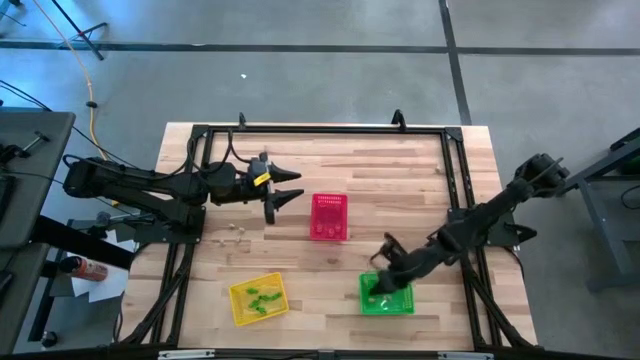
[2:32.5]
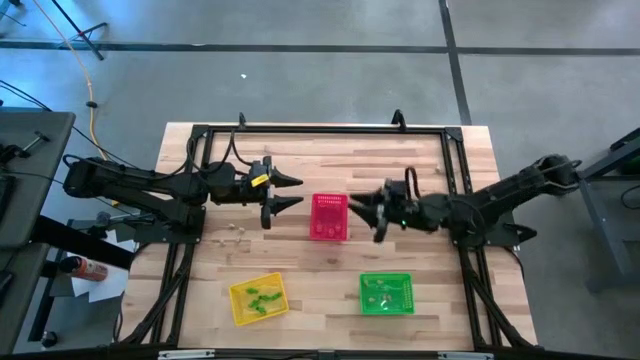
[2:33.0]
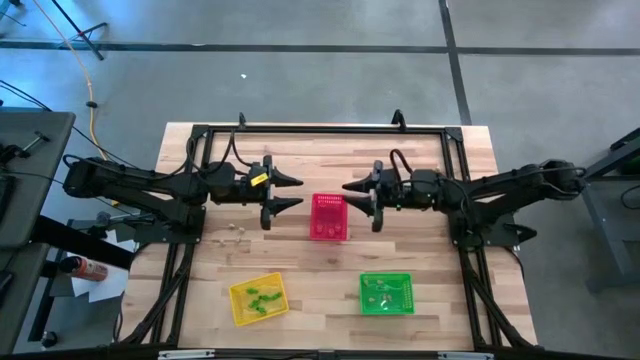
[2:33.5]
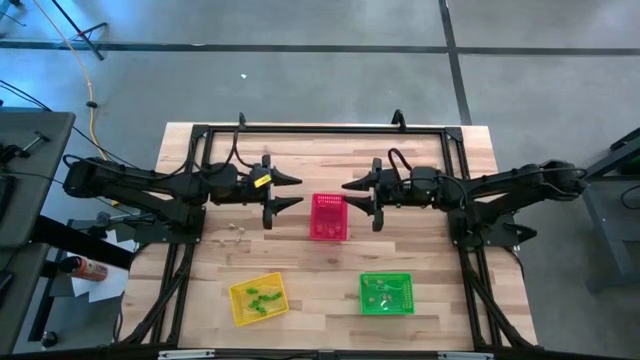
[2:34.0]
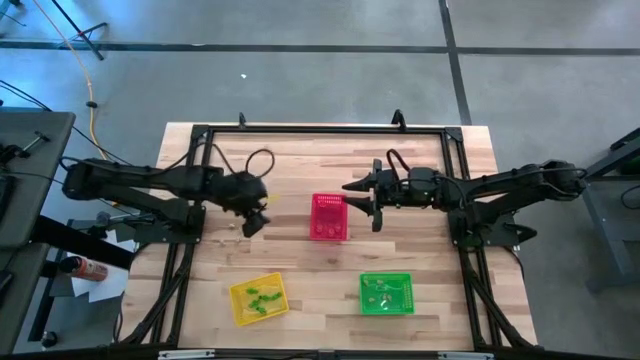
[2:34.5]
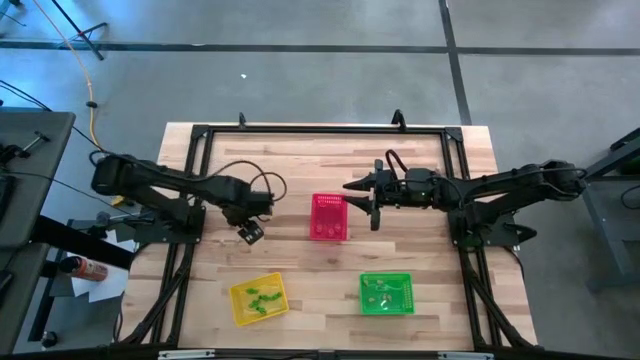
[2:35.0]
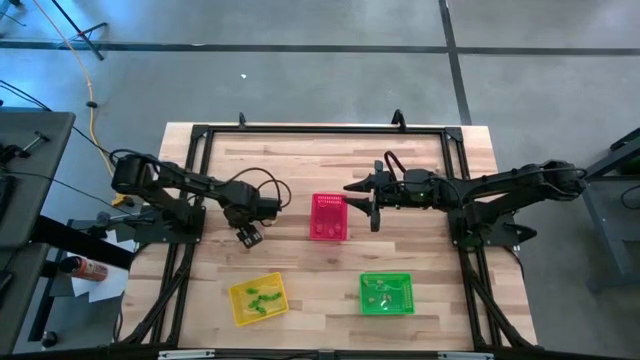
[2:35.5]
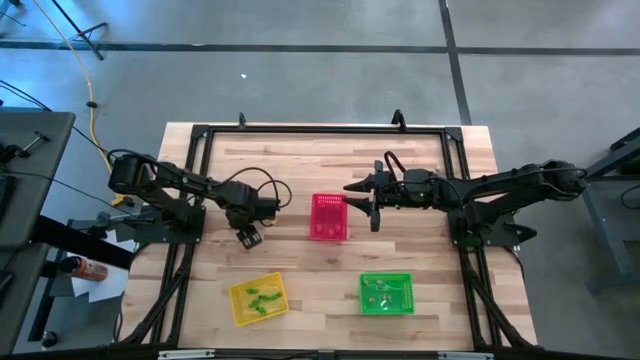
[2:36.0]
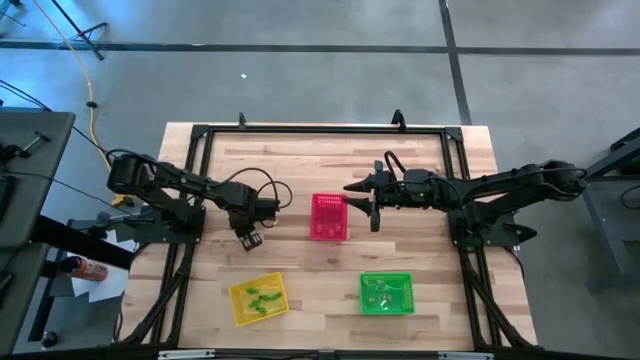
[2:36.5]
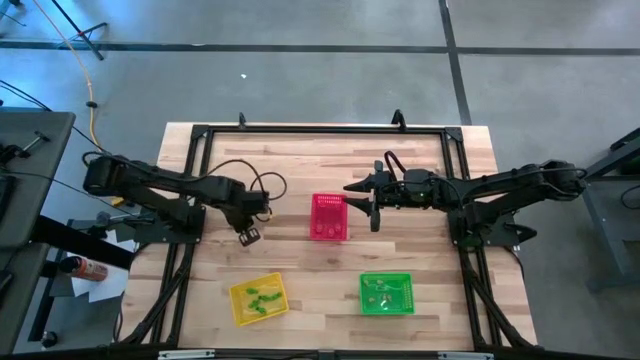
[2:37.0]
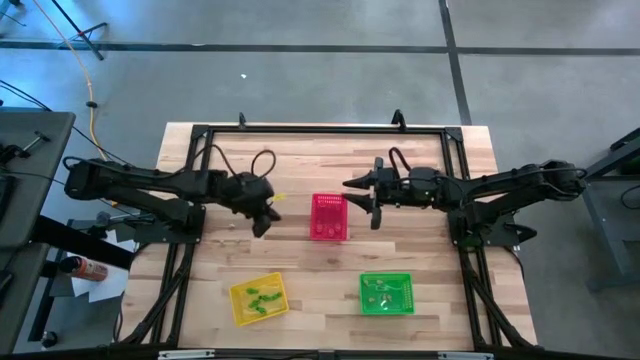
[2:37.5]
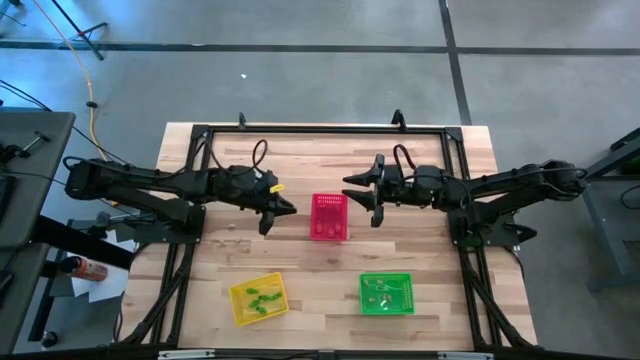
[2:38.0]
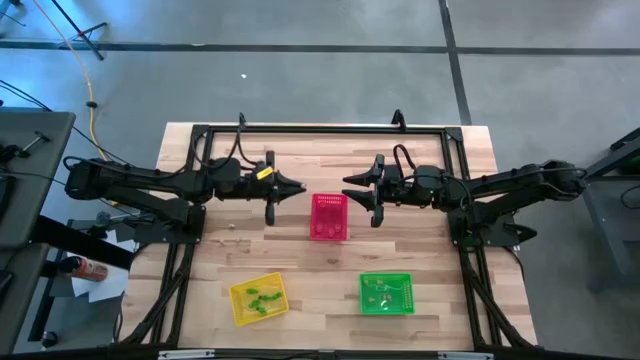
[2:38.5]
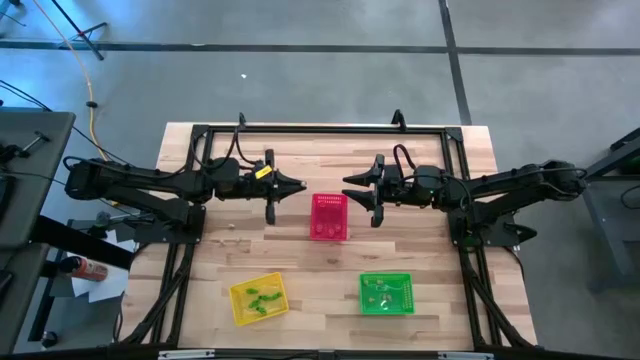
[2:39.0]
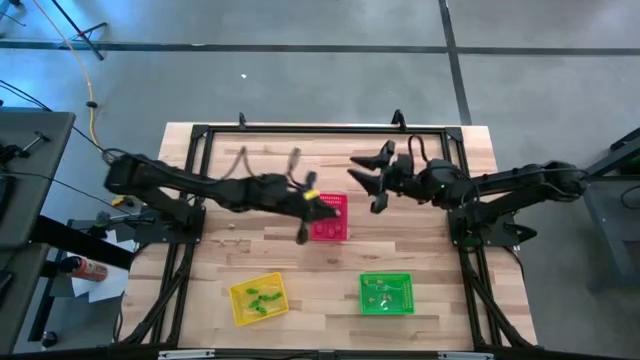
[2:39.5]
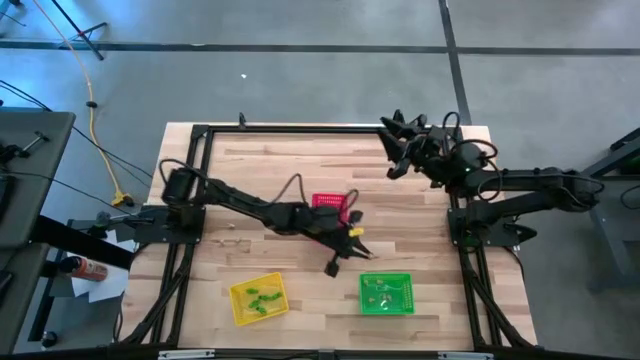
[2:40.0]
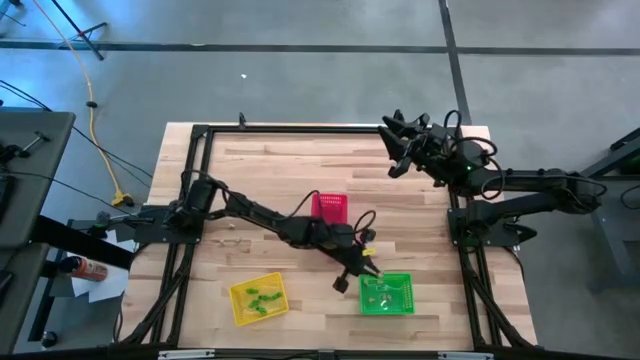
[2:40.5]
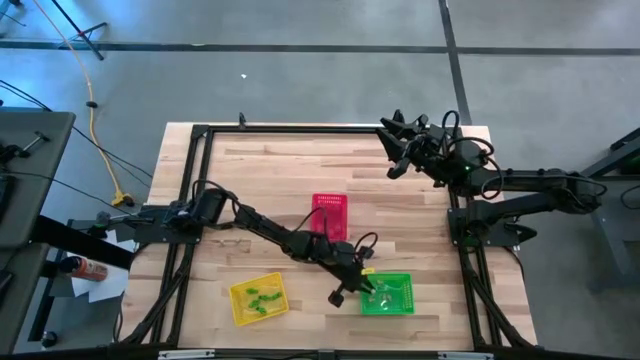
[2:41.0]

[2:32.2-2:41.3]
Task: Sort Halloween decoration
Put the white skull toy into the green bin

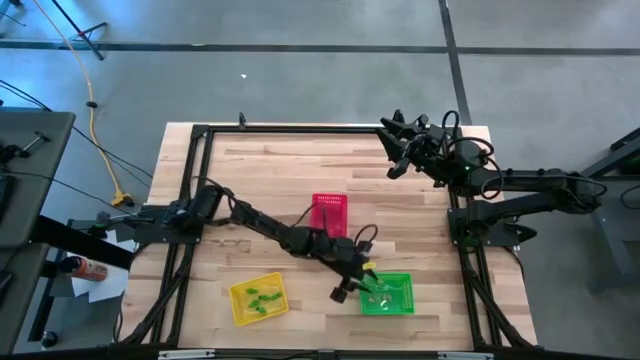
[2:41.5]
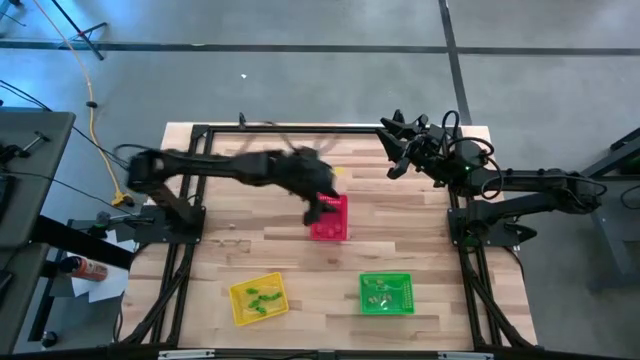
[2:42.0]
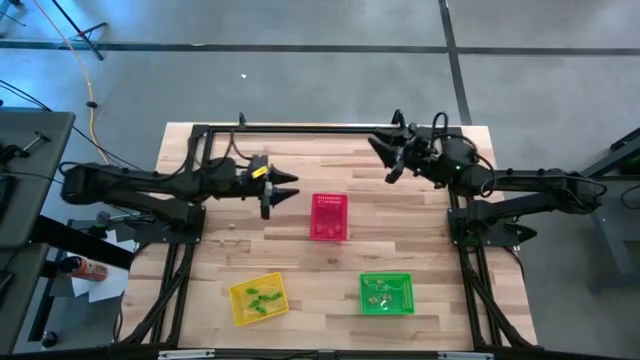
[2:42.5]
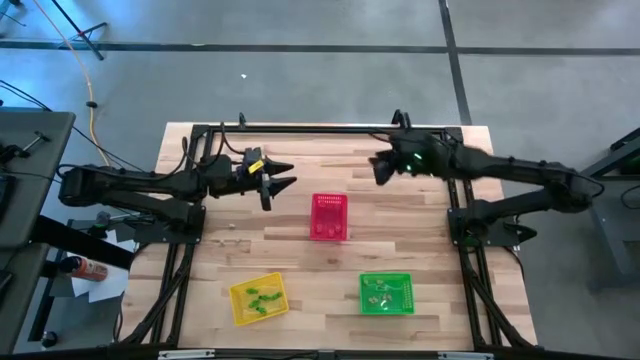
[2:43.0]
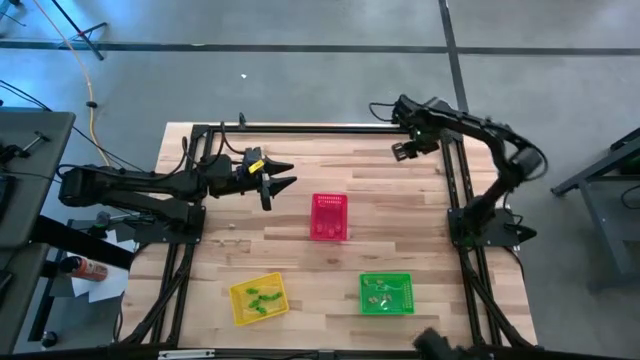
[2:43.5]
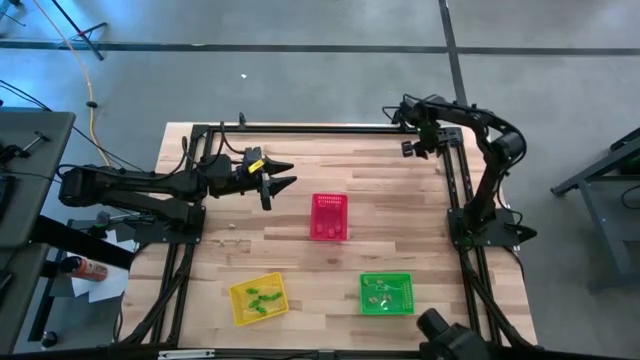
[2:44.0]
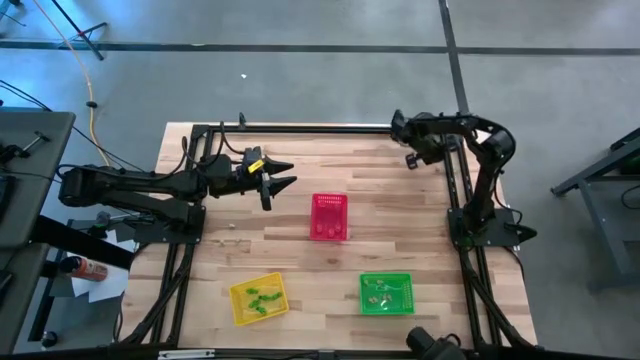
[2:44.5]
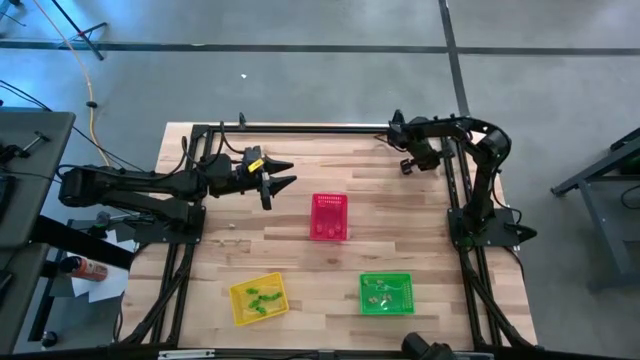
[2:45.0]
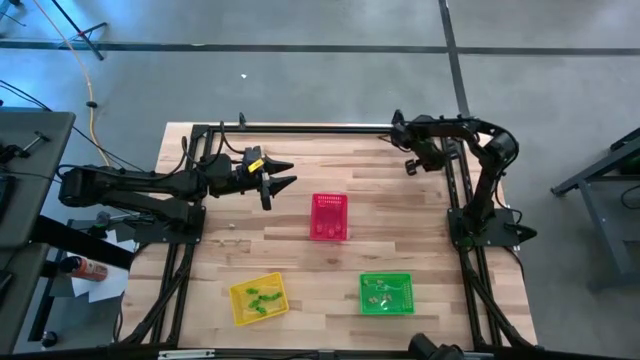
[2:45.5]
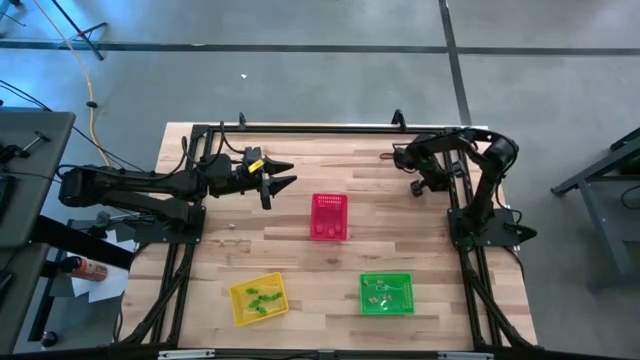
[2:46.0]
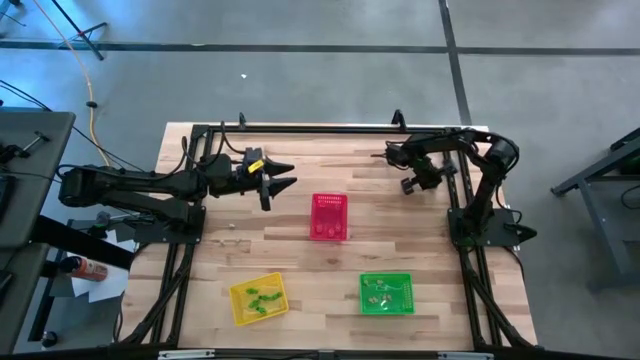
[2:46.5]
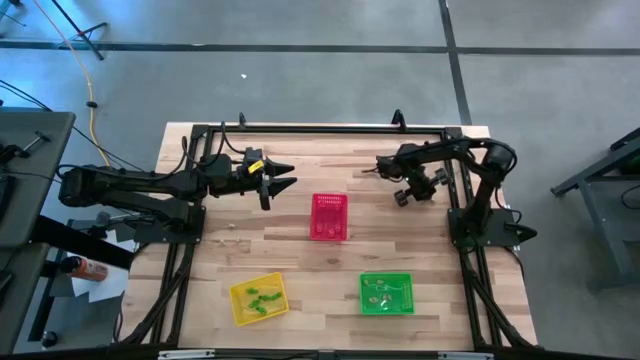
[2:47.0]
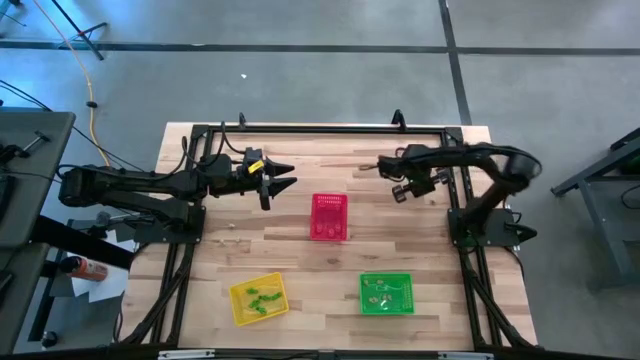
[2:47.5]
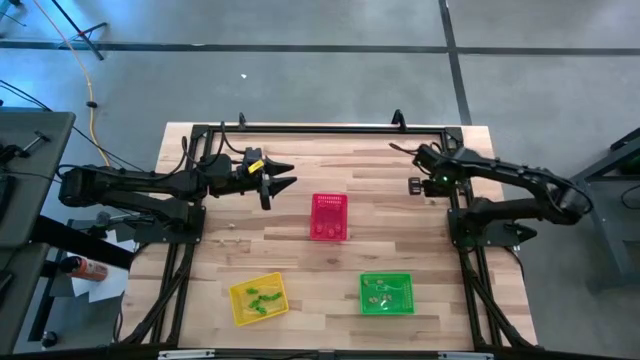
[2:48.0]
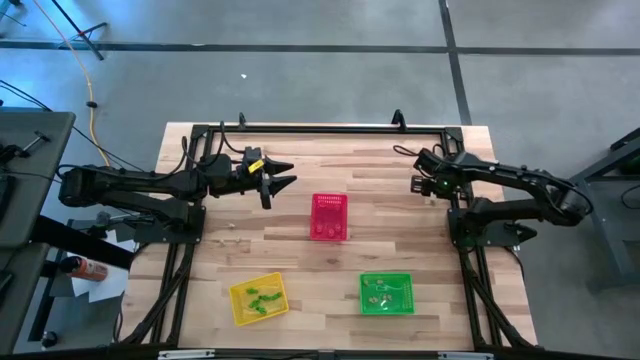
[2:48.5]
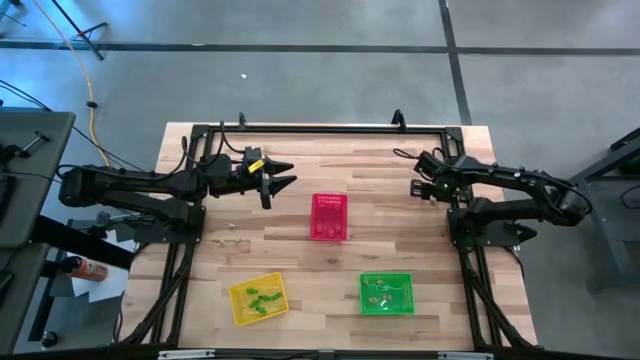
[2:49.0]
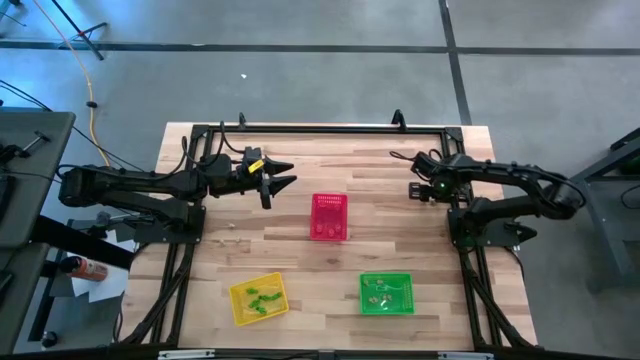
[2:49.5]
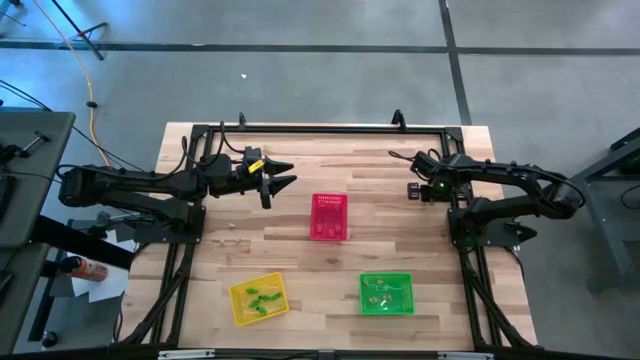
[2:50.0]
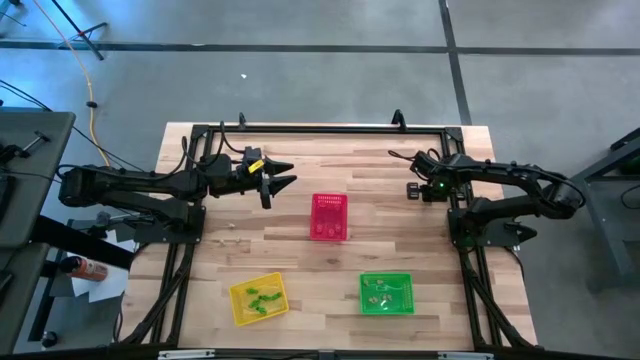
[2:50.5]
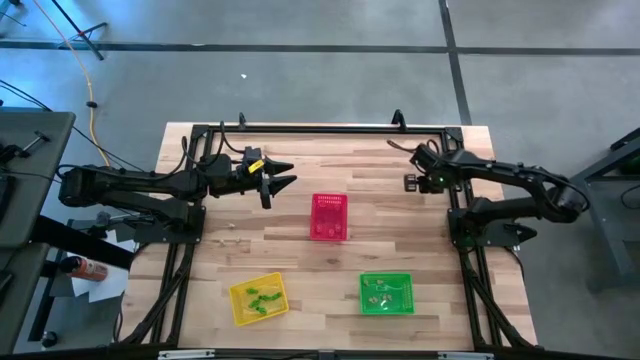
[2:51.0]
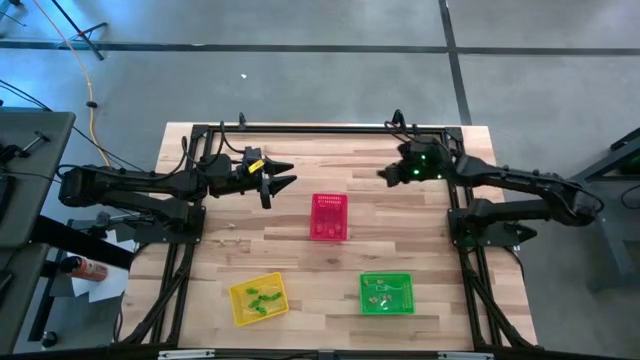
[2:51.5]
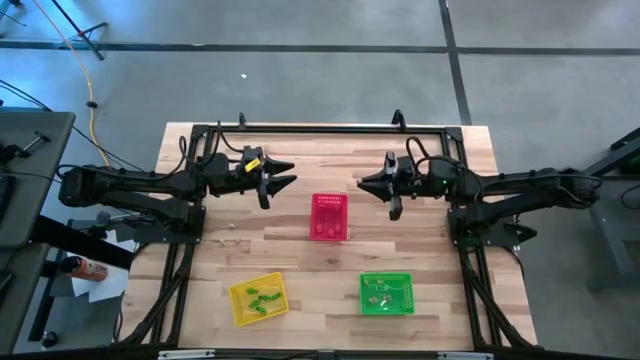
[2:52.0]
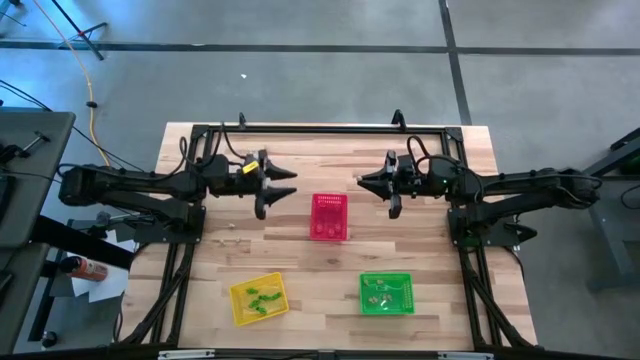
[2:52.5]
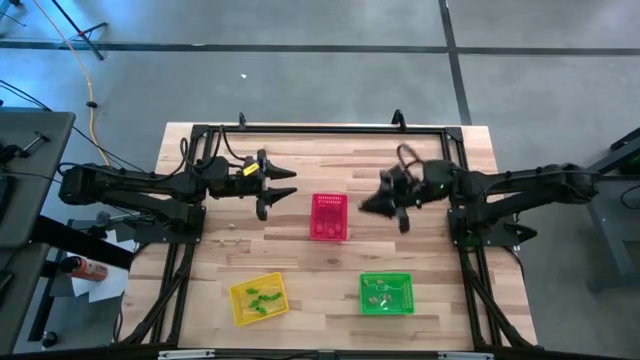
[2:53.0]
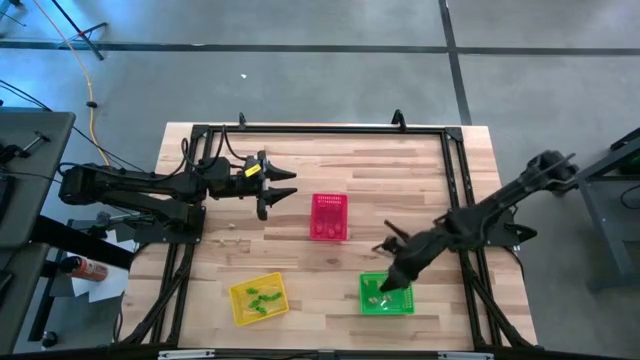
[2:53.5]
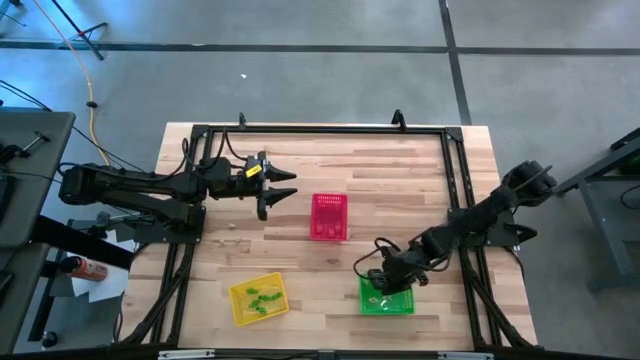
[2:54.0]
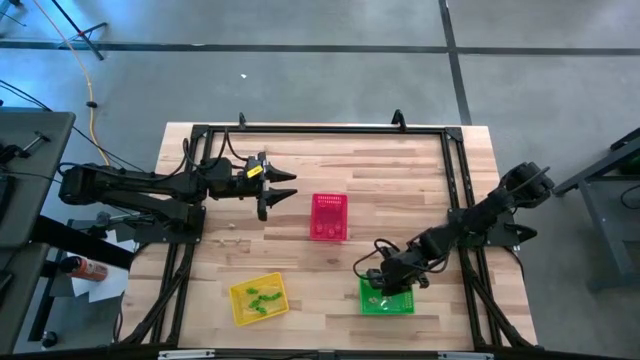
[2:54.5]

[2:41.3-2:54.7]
Put the white skull toy into the green bin
